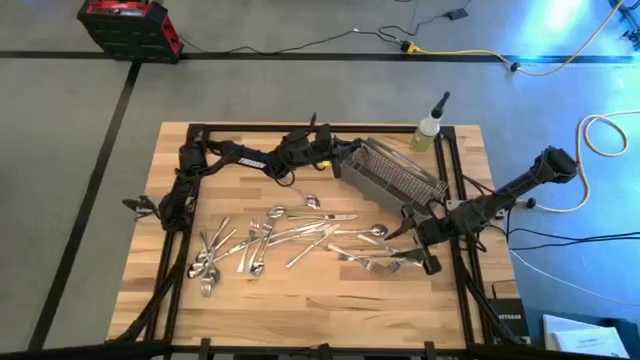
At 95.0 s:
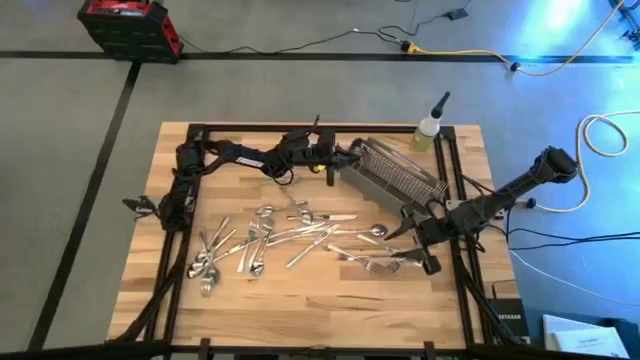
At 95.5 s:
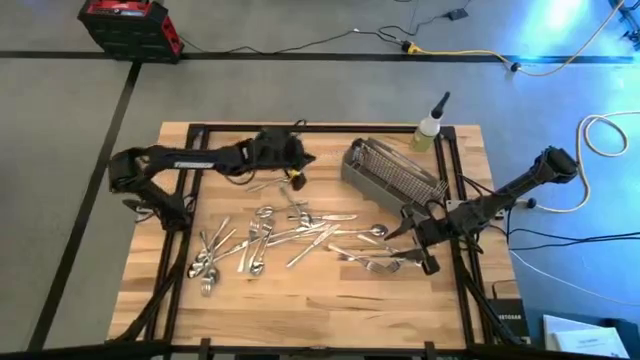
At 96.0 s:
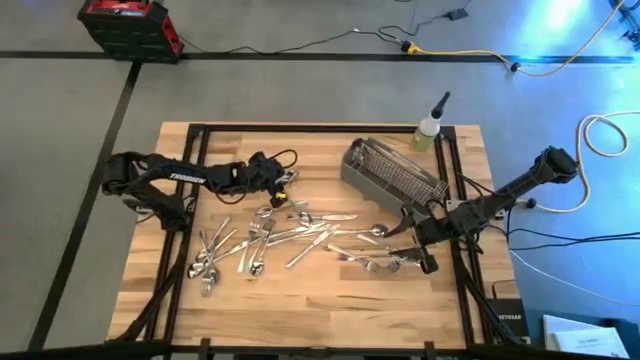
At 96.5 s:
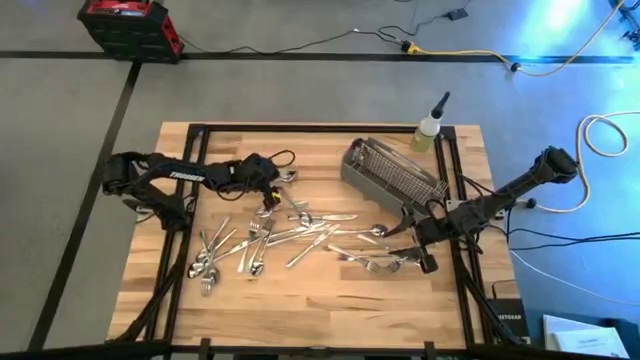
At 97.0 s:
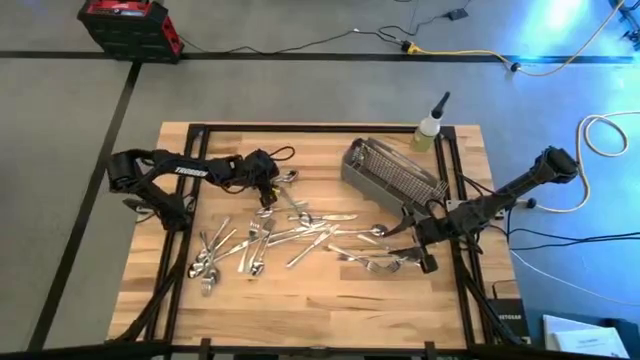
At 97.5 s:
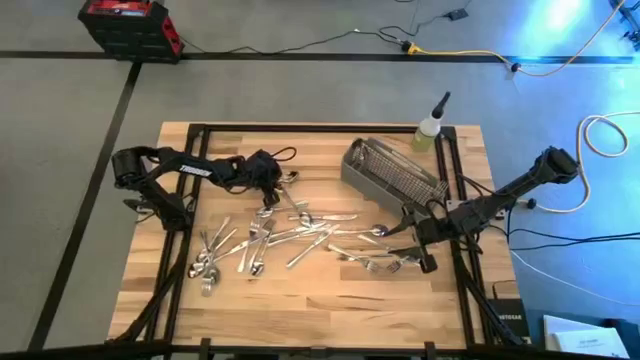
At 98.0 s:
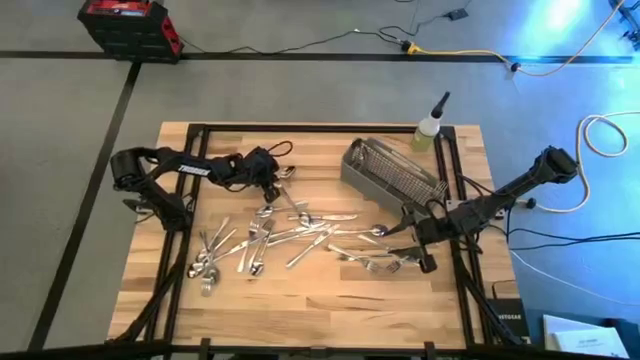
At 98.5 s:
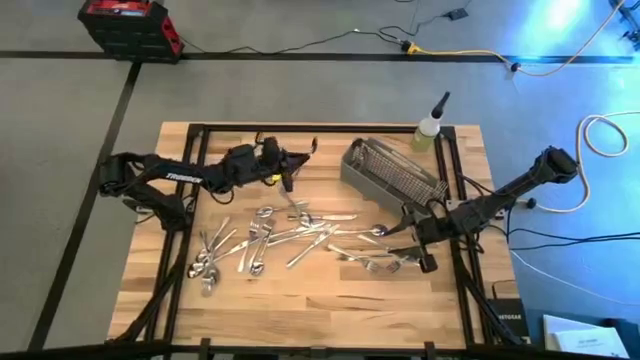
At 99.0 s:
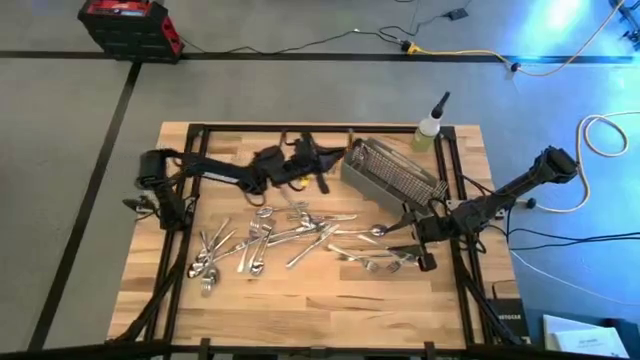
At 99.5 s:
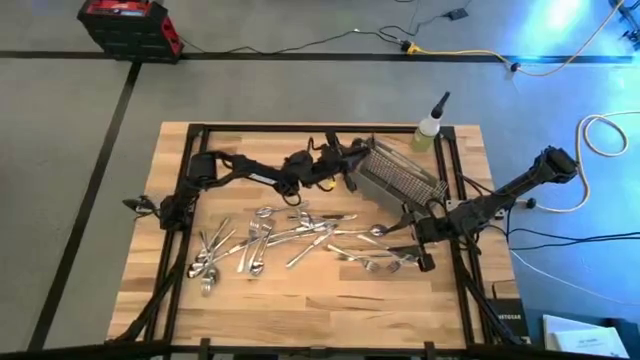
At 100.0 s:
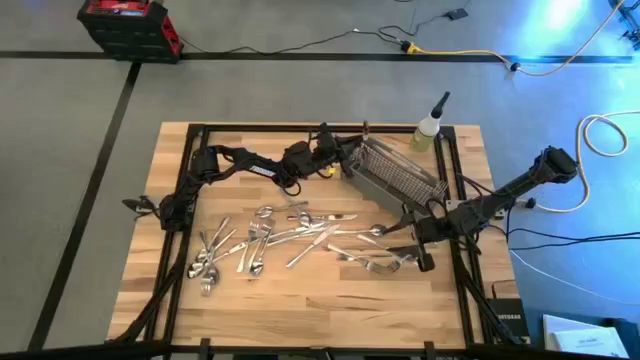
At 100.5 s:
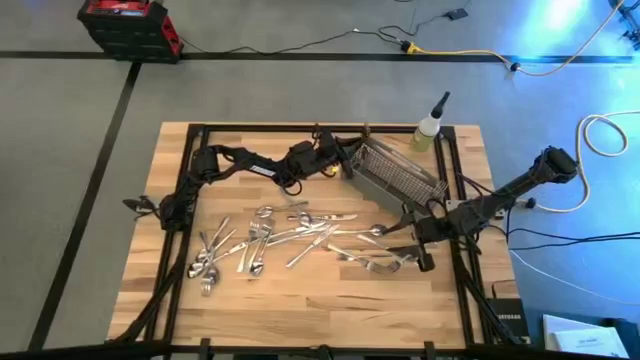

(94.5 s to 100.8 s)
Task: Sort silverware
Put the silver spoon into the gray silverware organizer

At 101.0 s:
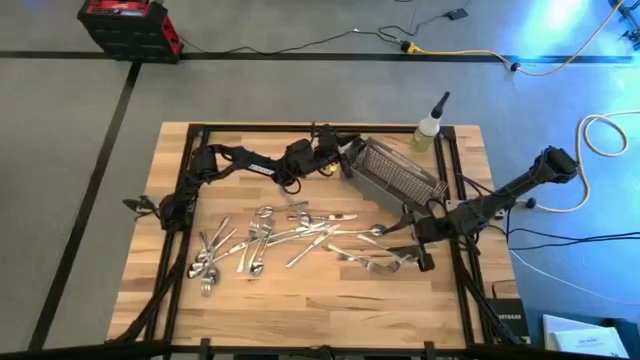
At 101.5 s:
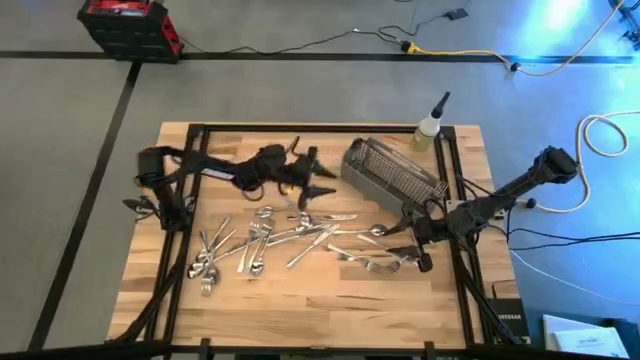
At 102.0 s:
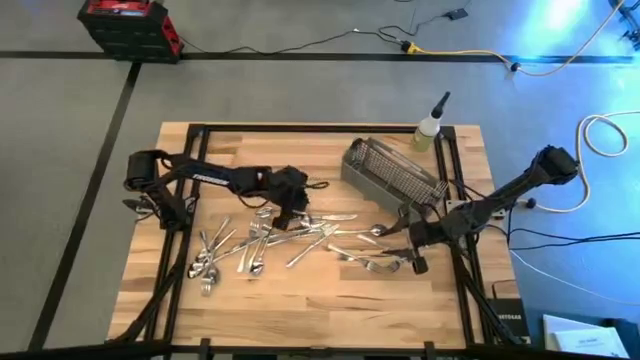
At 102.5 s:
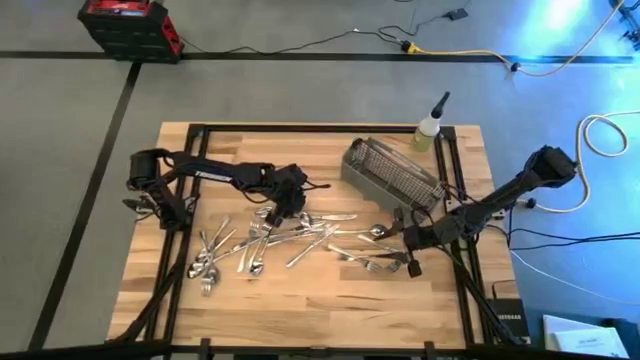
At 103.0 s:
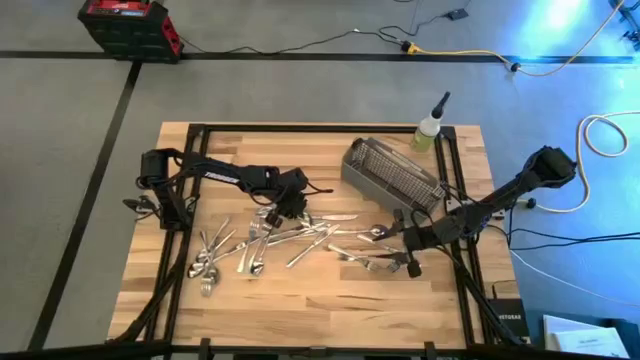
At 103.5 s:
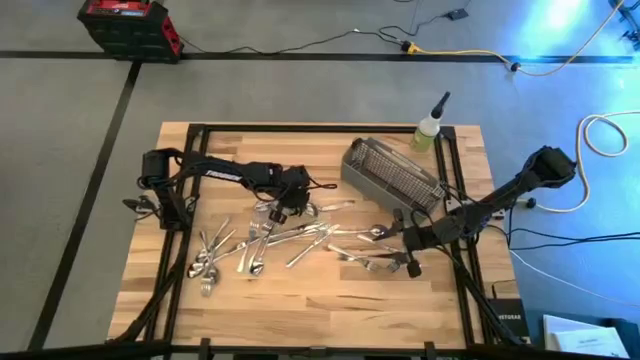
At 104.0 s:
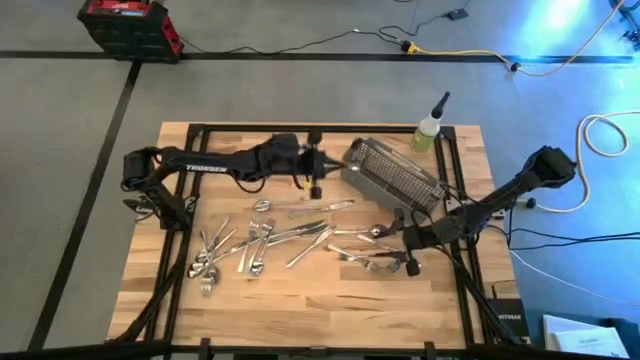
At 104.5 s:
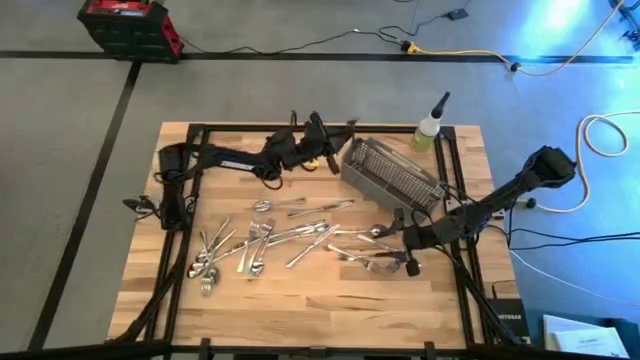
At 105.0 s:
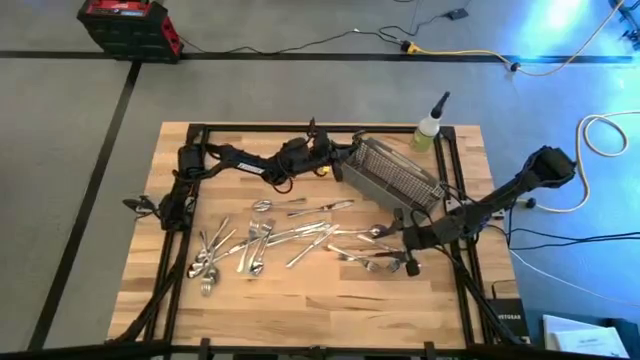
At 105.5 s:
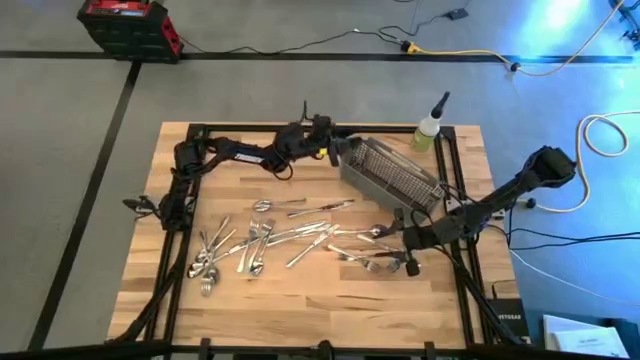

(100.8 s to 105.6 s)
Put the silver spoon into the gray silverware organizer

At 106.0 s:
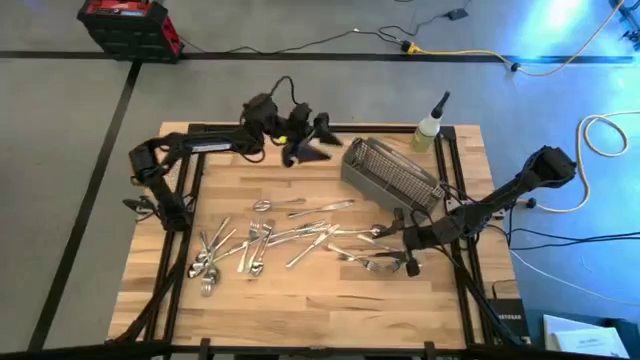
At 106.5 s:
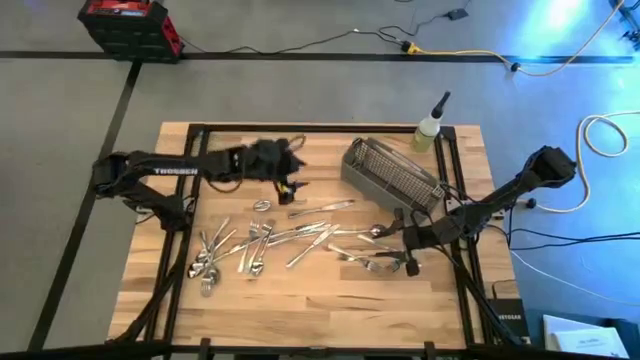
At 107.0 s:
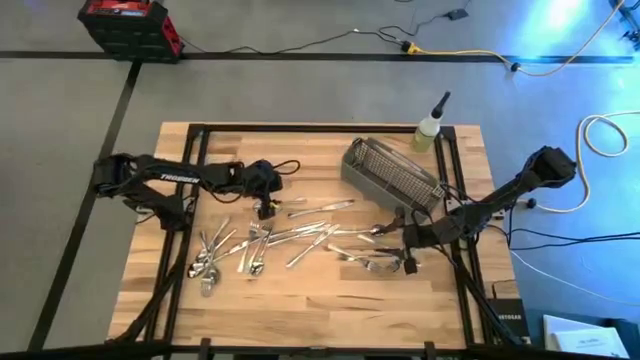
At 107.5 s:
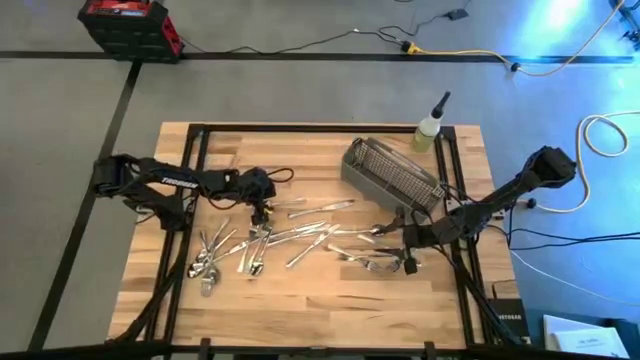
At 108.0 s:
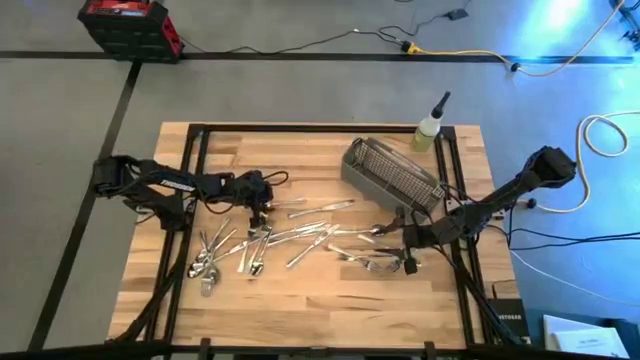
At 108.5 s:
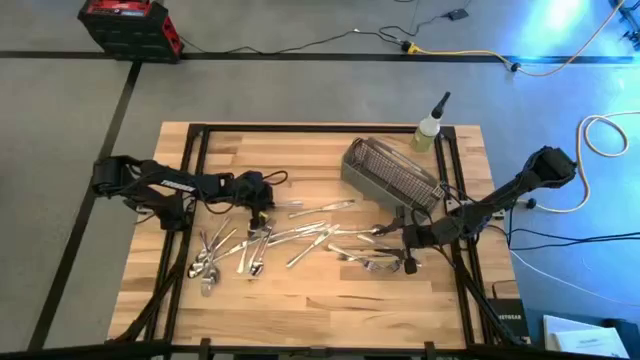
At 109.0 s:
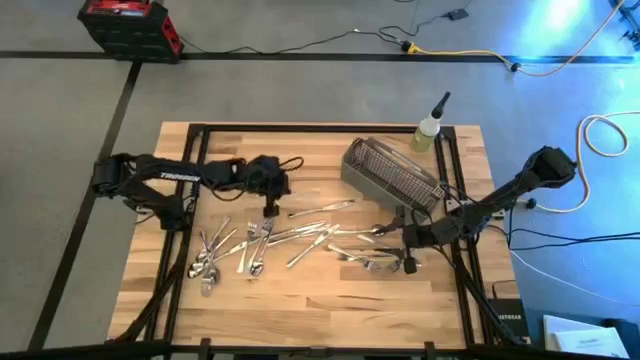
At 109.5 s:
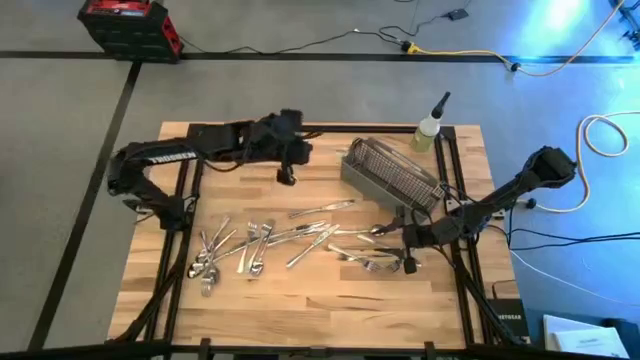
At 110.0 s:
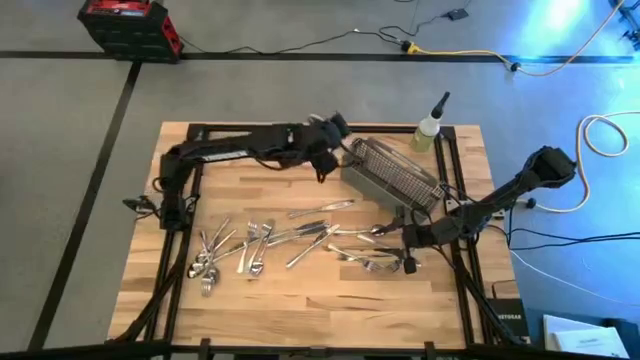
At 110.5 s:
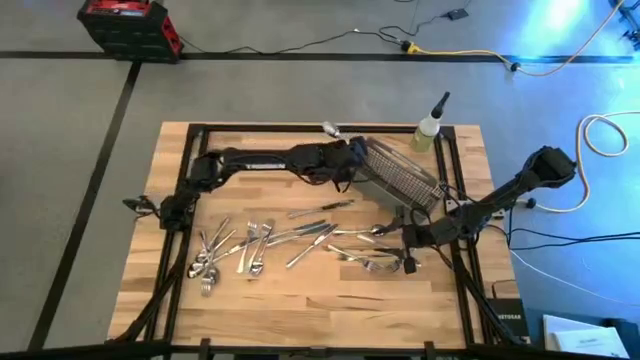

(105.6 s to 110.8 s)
Put the silver spoon into the gray silverware organizer

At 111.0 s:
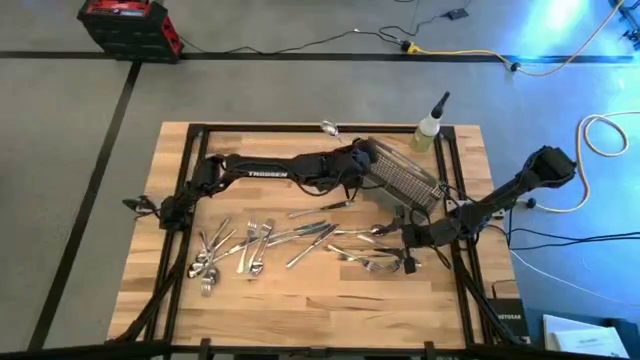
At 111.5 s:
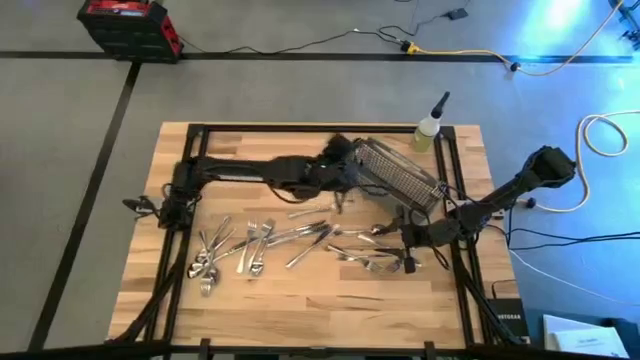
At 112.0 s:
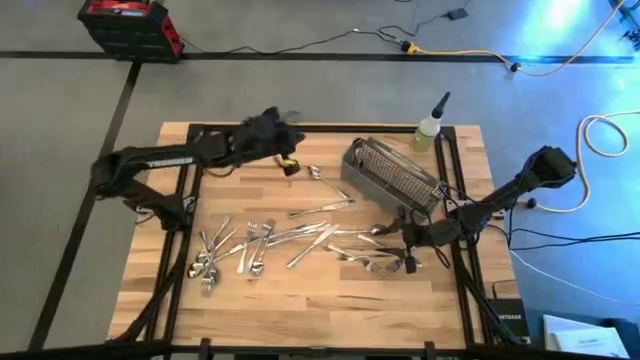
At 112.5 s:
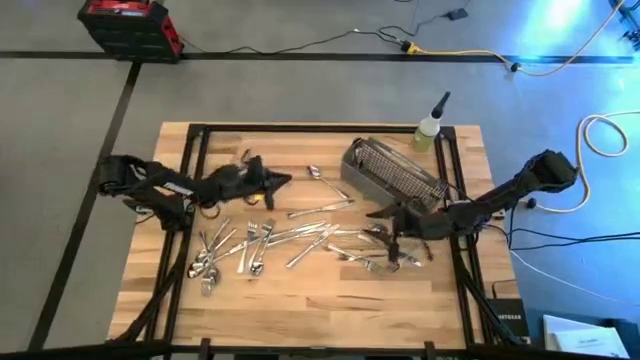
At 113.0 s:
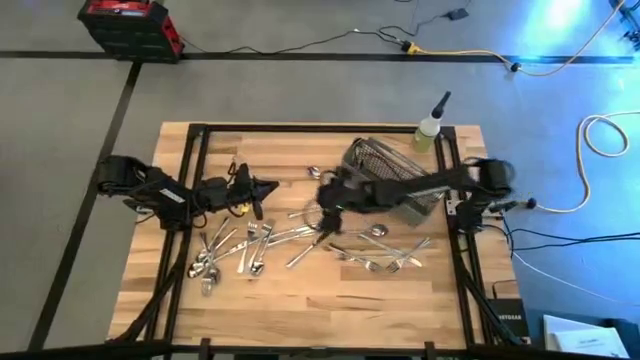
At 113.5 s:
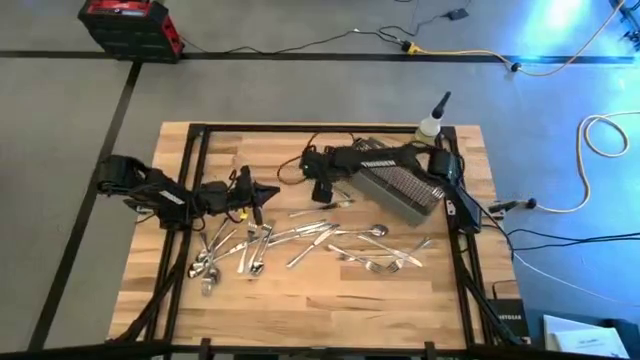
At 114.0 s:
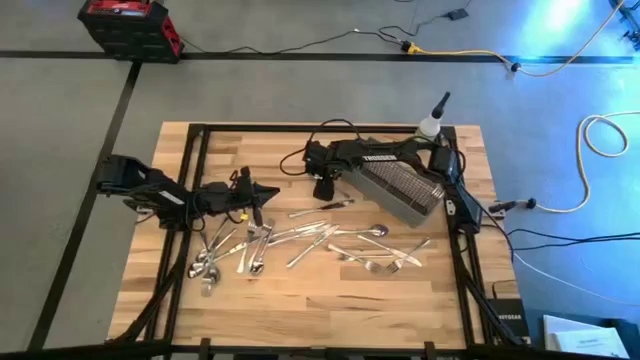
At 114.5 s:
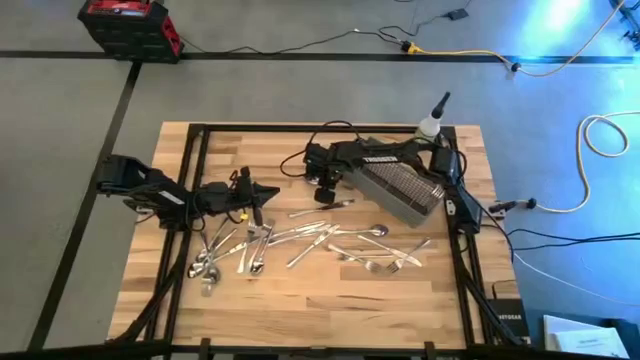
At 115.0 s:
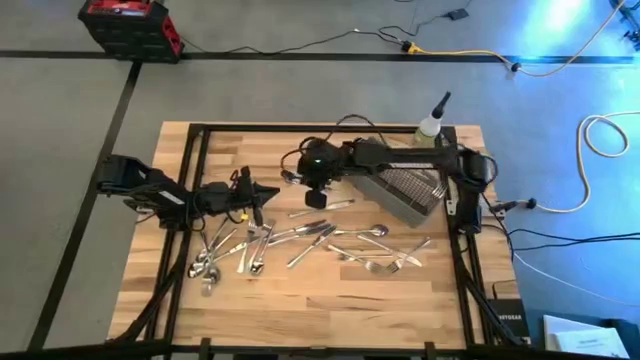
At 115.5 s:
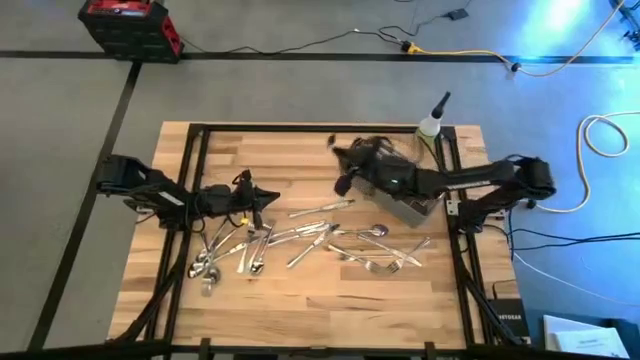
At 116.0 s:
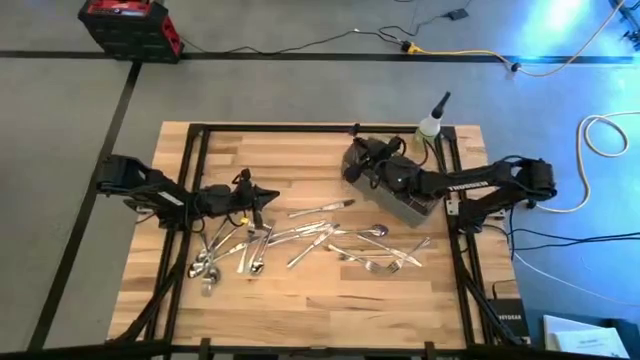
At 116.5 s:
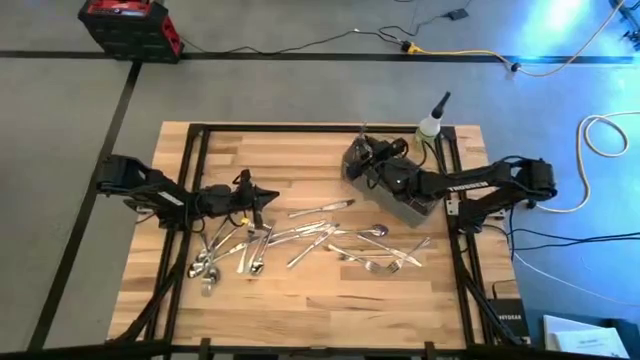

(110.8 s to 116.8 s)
Put the silver spoon into the gray silverware organizer
